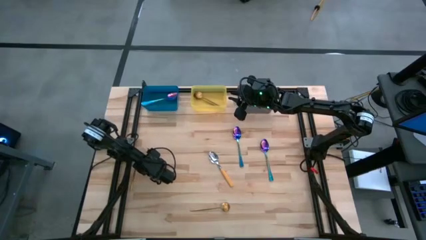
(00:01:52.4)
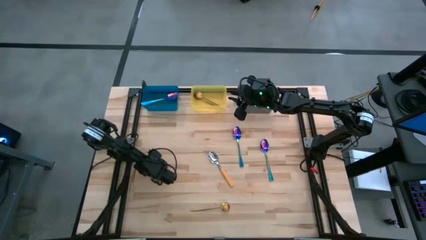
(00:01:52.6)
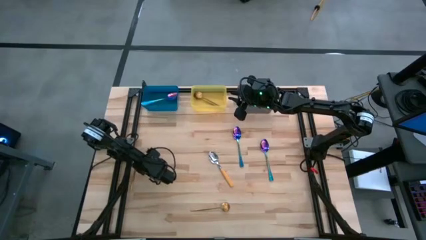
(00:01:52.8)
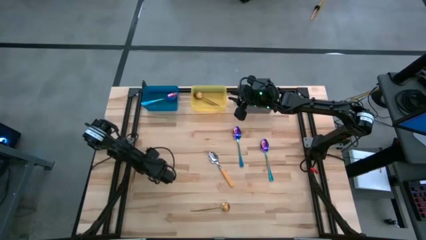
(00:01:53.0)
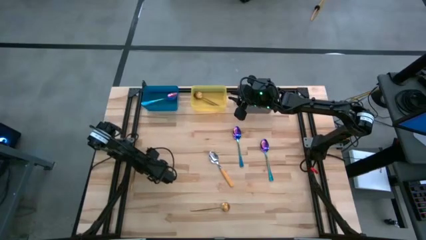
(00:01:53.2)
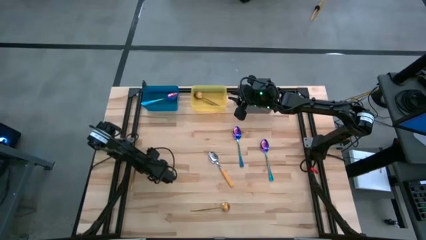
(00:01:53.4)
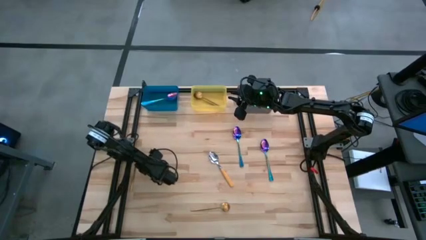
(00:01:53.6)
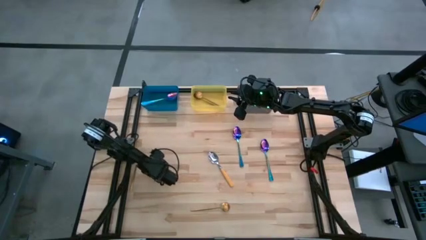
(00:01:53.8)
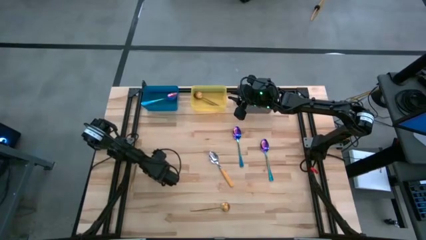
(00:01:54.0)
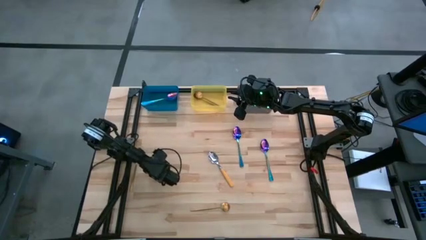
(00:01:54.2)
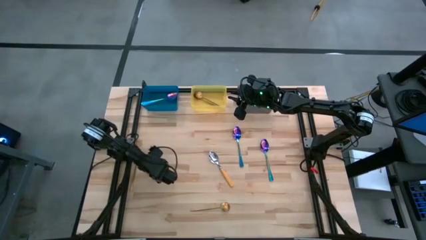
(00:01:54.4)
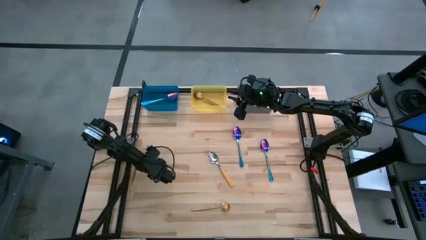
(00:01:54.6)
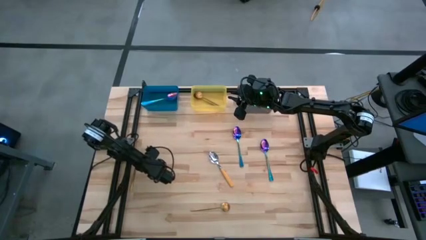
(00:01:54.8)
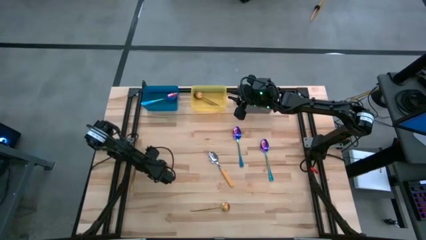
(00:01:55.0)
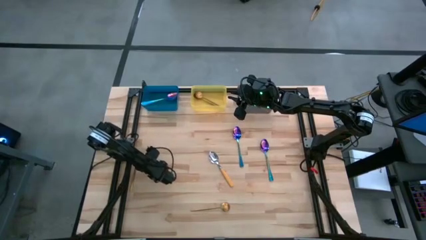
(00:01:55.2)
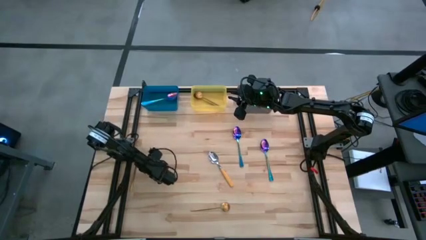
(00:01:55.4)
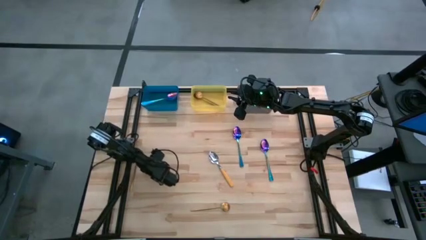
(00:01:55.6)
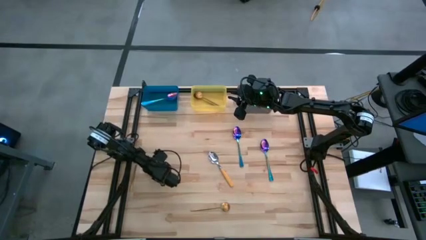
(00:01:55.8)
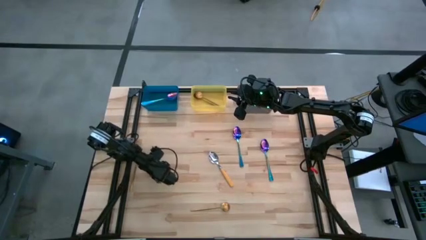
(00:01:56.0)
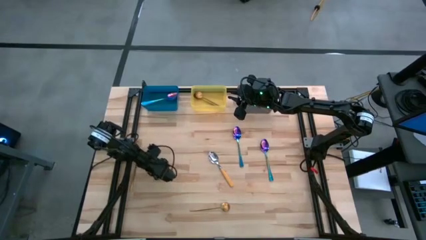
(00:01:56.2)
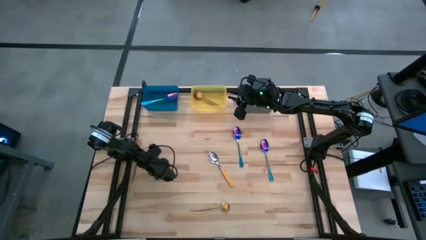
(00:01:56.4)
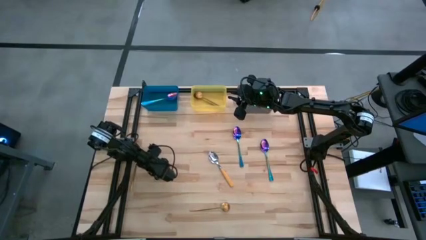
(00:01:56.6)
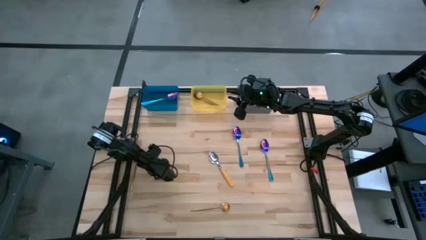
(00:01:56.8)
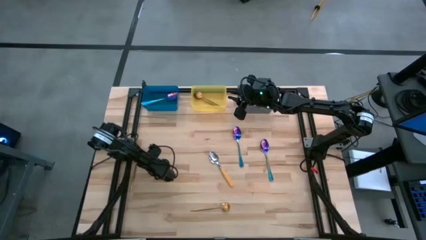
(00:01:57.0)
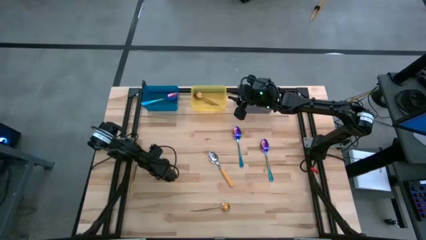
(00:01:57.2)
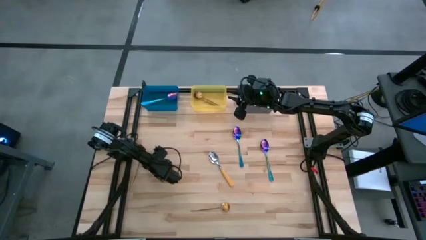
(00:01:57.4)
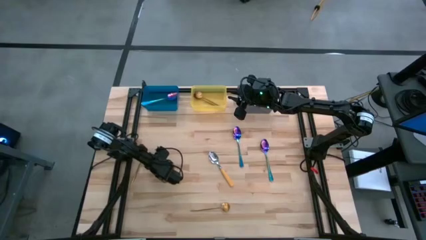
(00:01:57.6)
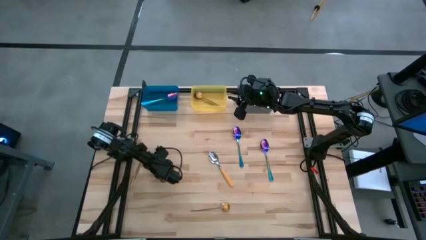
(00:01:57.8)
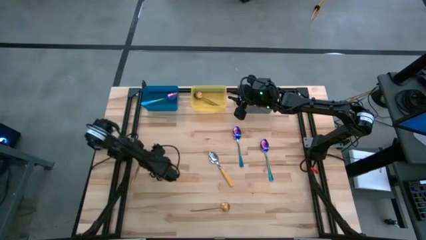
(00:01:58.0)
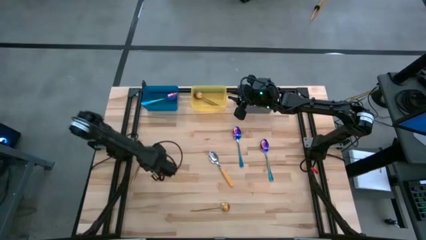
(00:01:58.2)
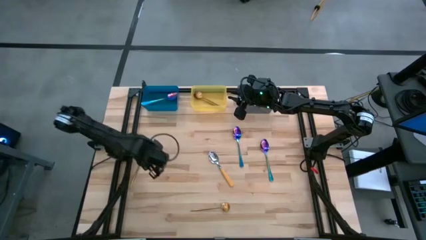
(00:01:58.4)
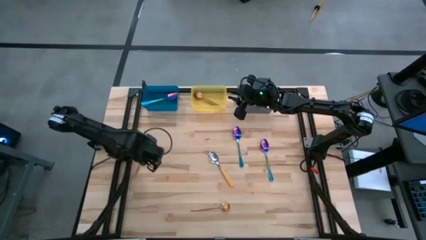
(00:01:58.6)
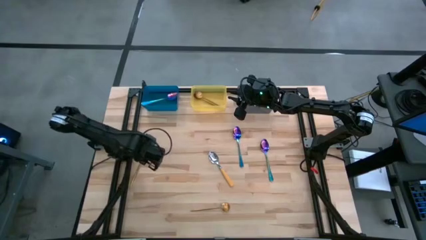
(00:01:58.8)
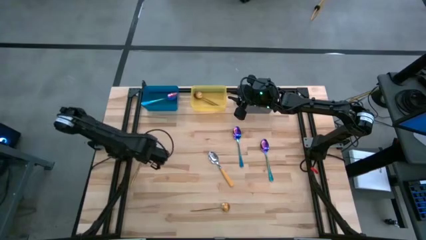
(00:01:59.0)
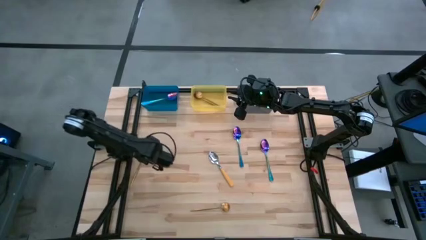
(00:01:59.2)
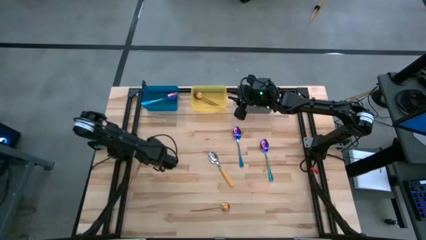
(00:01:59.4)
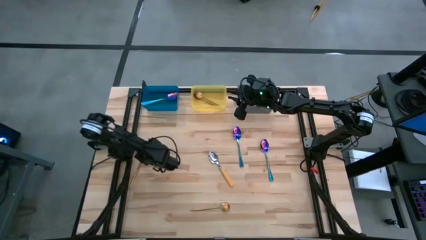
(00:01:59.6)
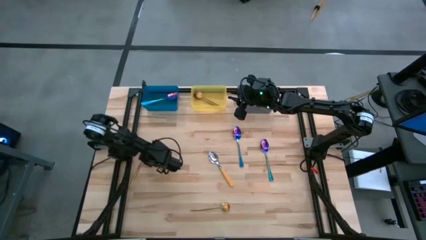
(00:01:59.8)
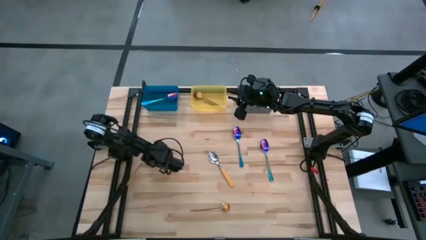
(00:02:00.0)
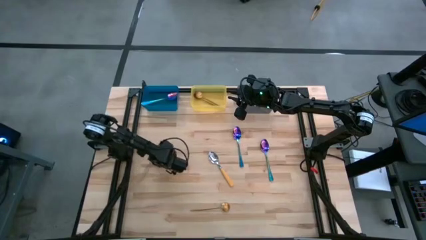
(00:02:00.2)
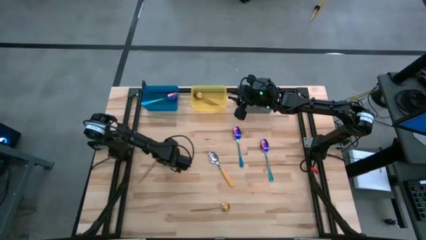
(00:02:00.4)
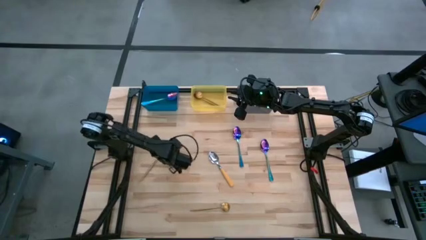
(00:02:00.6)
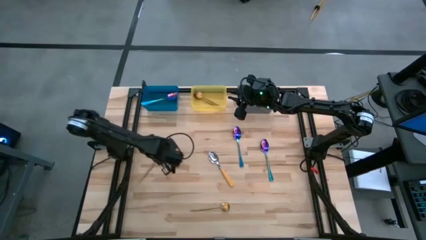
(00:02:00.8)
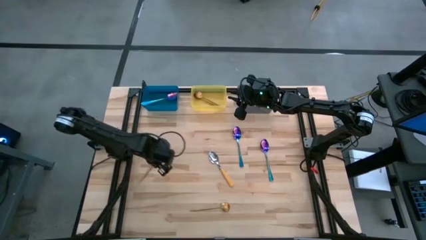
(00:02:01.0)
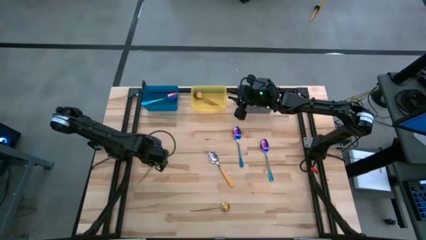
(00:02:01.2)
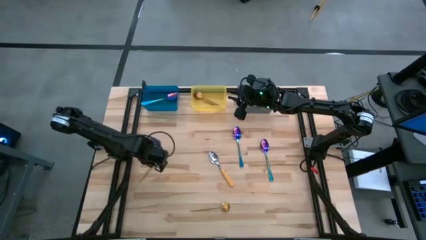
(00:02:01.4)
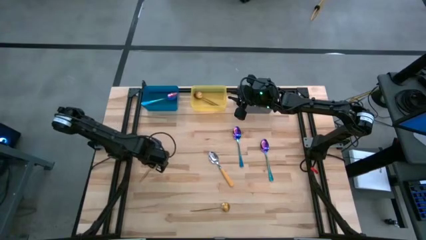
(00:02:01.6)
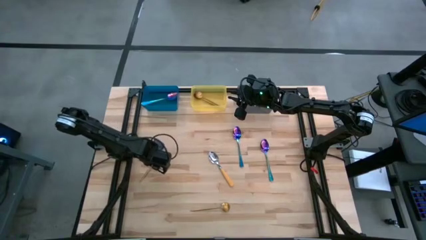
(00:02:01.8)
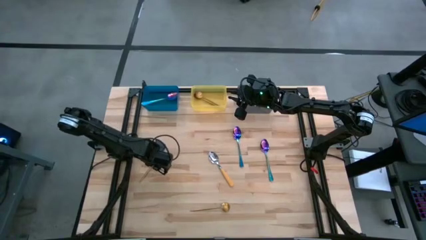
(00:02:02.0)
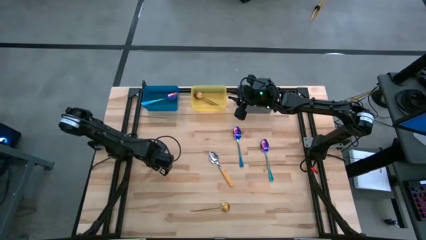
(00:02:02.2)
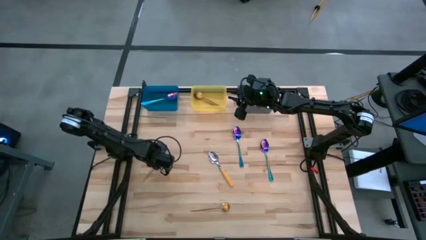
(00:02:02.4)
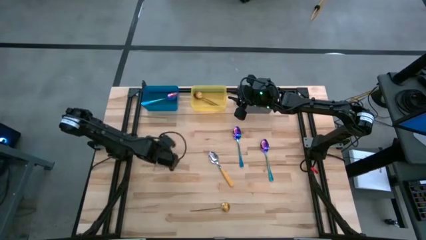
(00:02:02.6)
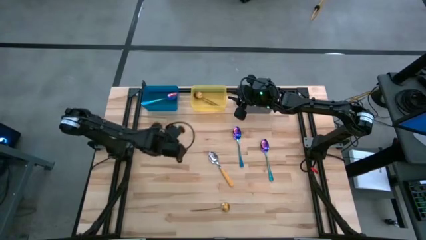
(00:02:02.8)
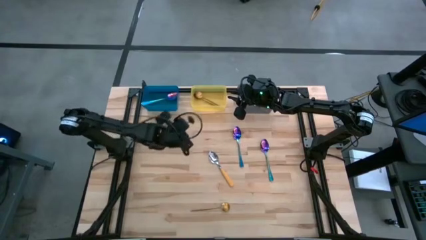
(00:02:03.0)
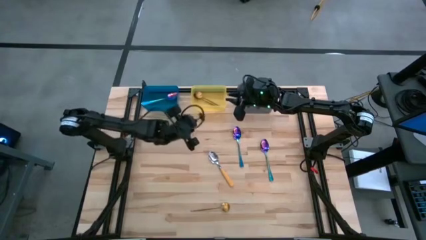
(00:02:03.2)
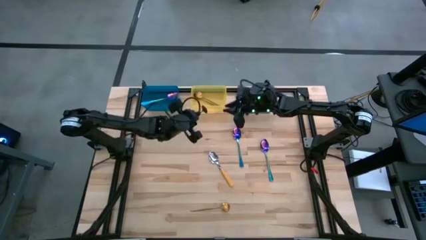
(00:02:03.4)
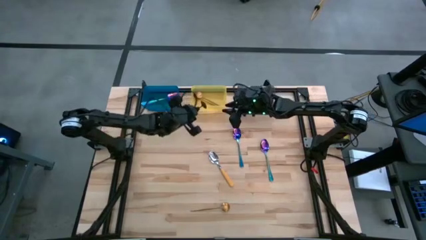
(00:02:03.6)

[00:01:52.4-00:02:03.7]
Task: Sort silverware by color (type)
Put the gold spoon into the yellow bin

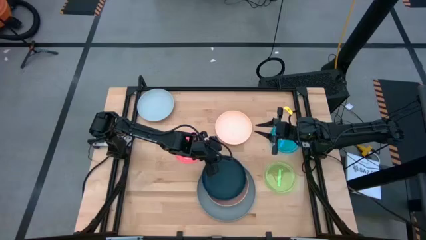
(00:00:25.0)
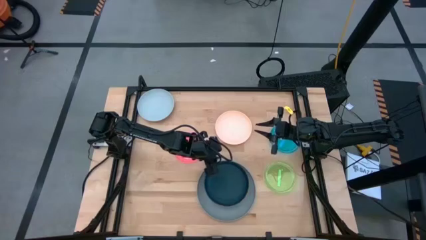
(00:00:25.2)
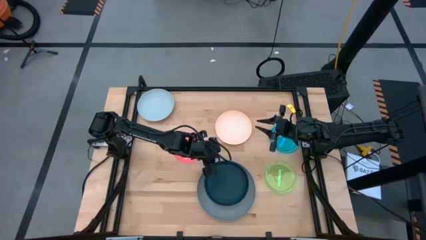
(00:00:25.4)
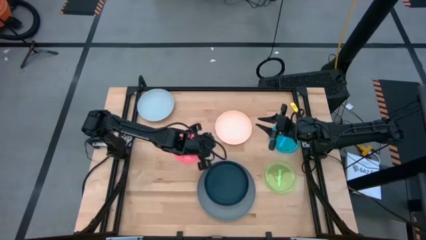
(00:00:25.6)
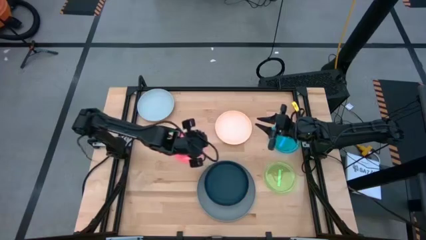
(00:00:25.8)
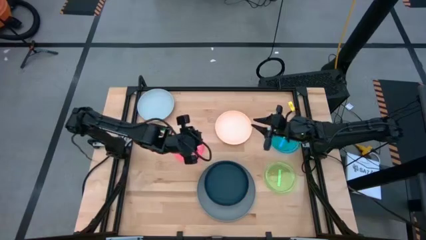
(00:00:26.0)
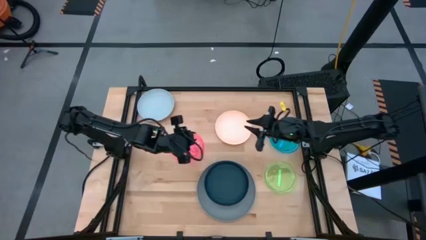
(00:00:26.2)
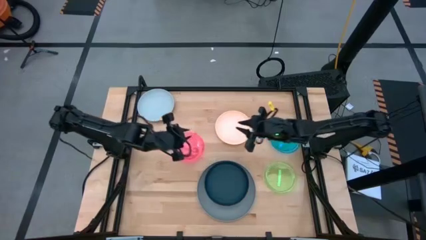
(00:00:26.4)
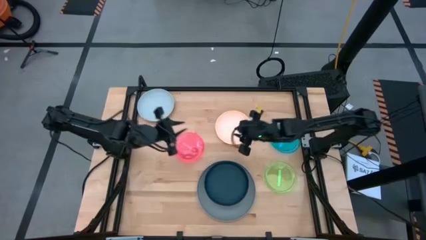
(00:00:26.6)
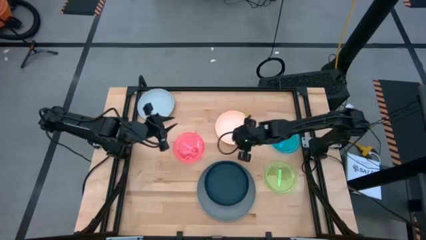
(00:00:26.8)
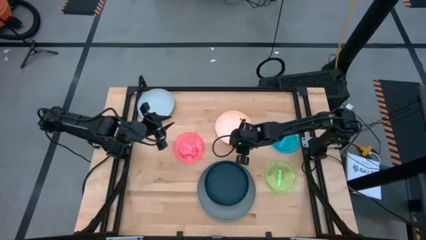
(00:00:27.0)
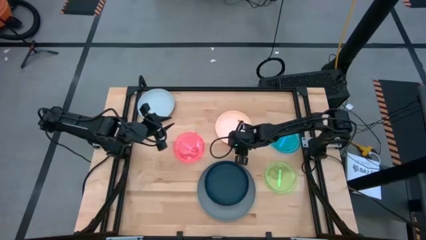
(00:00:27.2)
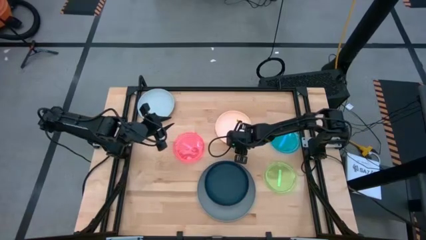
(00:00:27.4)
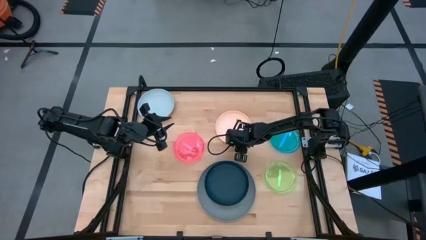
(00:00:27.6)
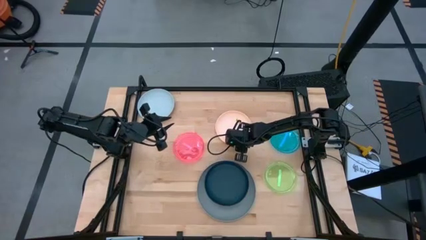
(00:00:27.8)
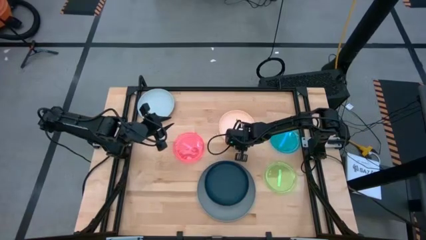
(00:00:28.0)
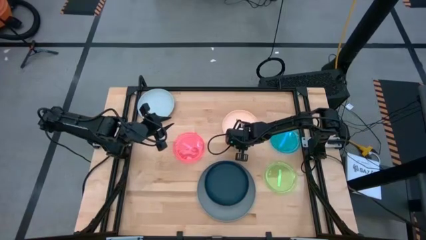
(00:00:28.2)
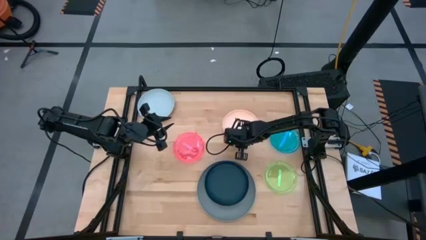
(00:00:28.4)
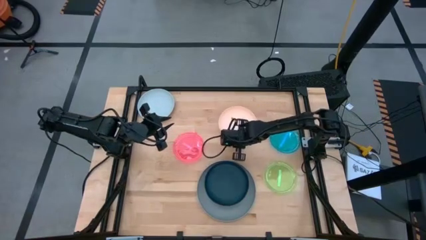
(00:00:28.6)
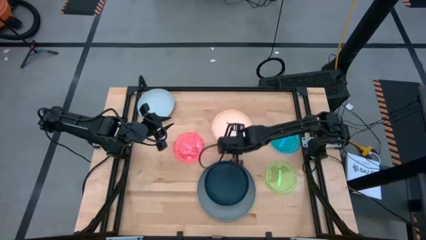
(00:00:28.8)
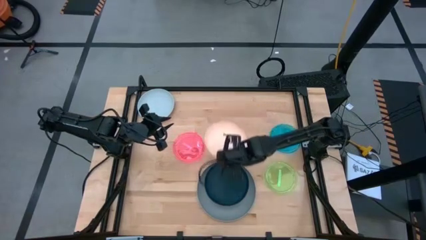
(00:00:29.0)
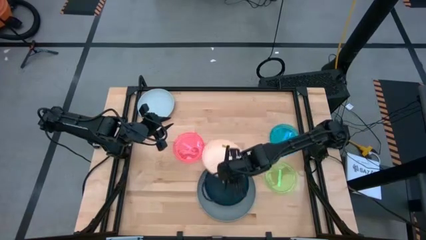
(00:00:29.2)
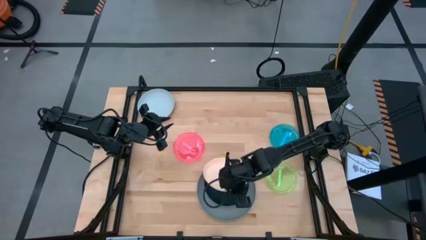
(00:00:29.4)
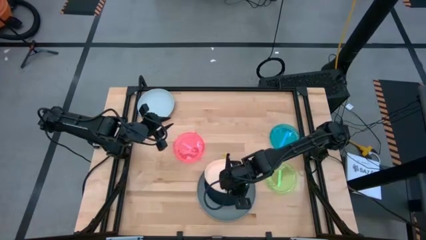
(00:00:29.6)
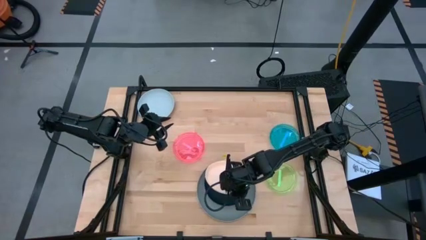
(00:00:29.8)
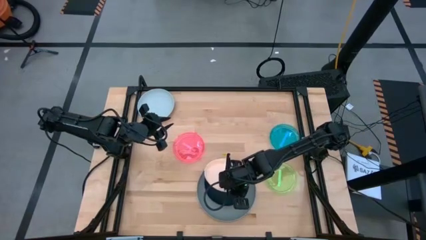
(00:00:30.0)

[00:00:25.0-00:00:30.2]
Task: Stack plastic plates
Stack the light orange plate on top of the black plate
